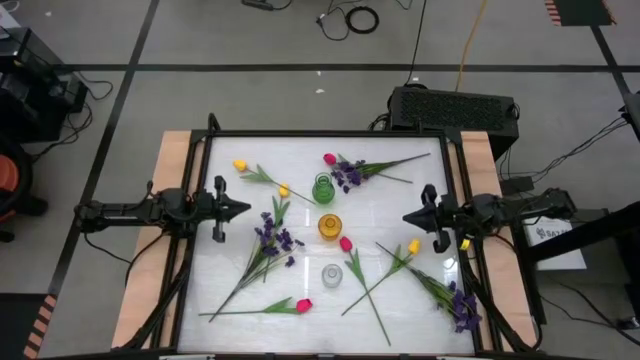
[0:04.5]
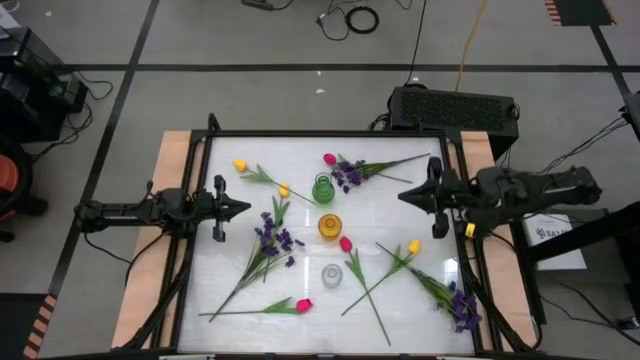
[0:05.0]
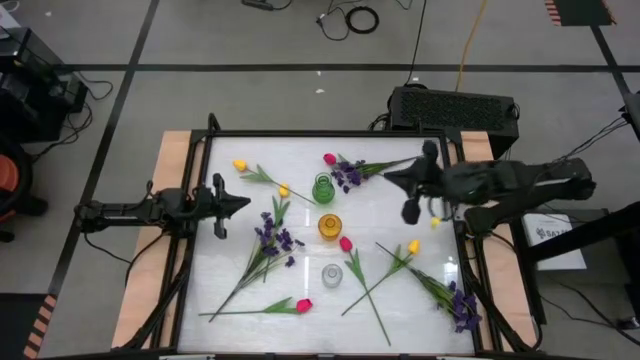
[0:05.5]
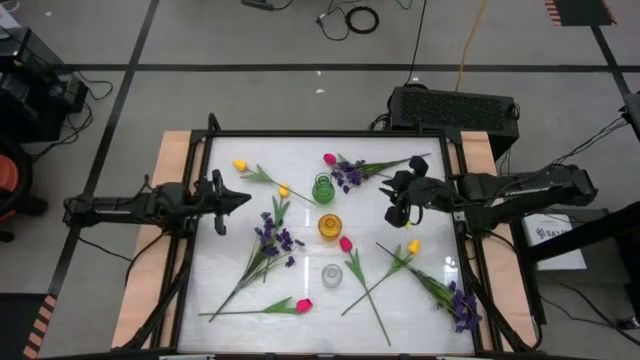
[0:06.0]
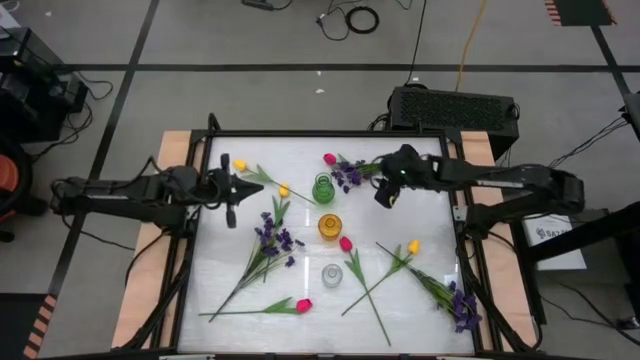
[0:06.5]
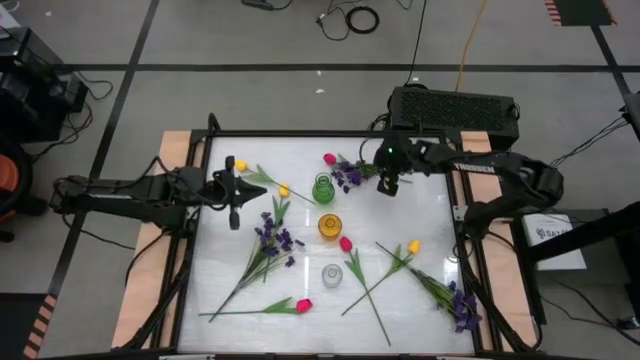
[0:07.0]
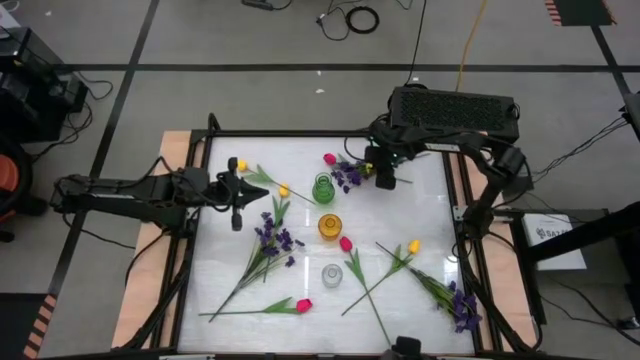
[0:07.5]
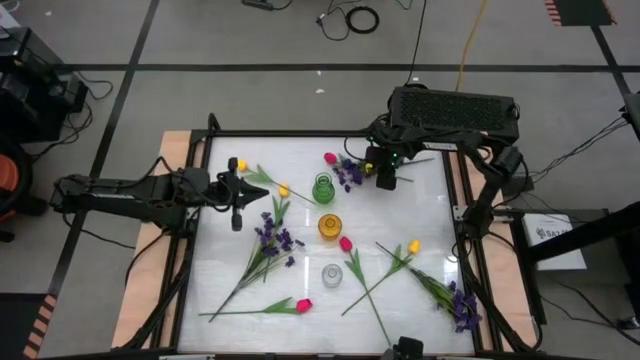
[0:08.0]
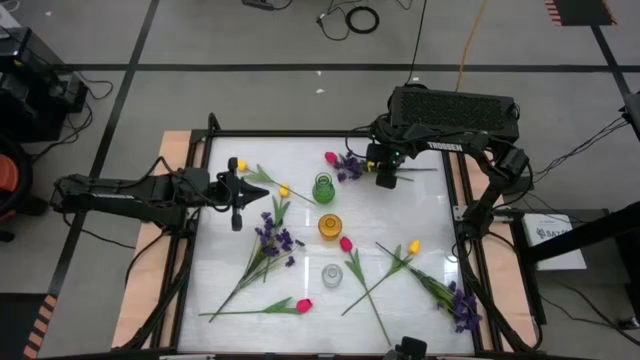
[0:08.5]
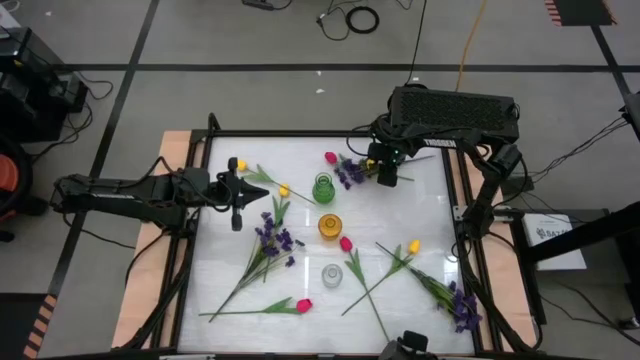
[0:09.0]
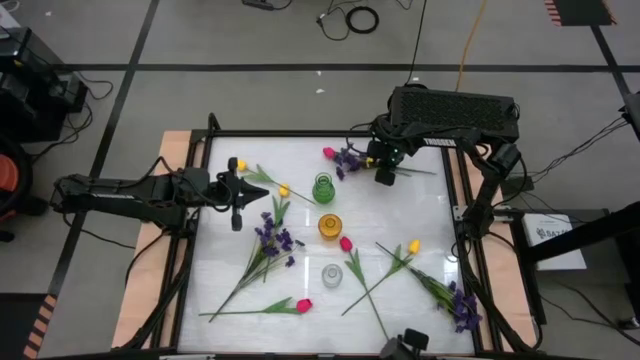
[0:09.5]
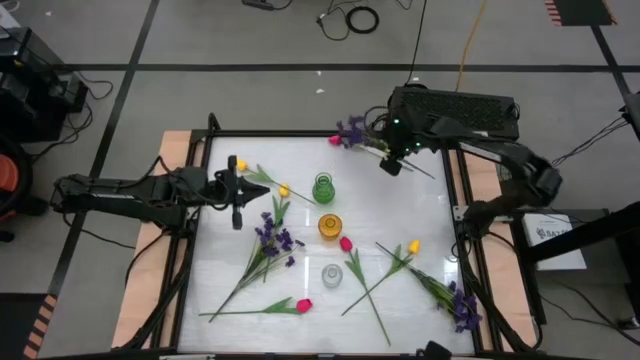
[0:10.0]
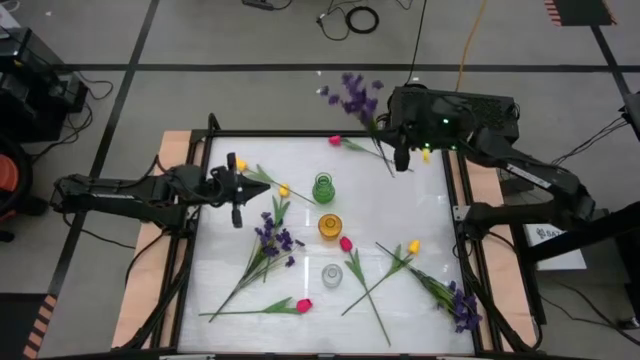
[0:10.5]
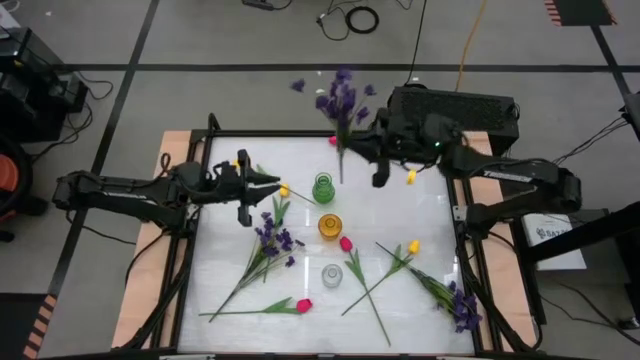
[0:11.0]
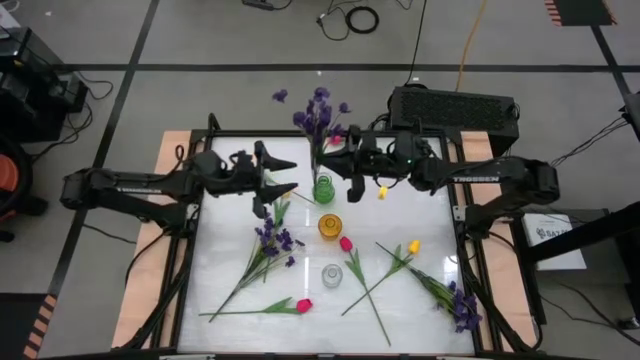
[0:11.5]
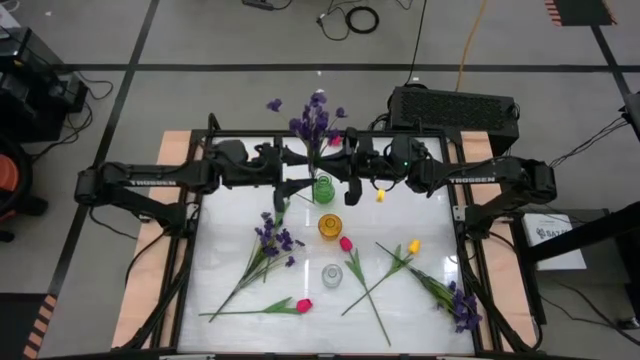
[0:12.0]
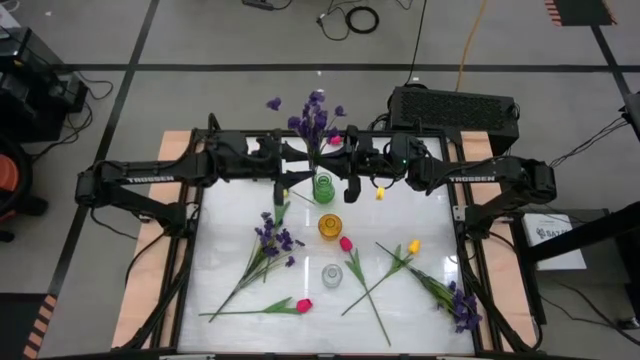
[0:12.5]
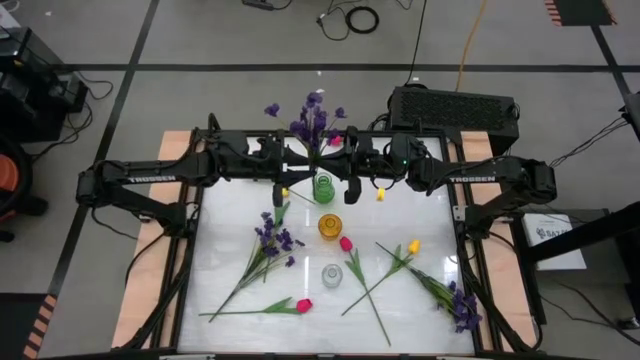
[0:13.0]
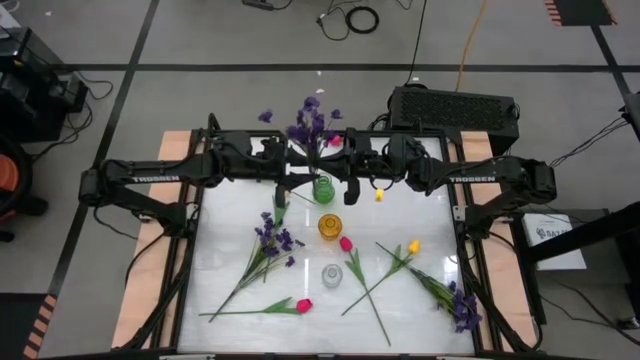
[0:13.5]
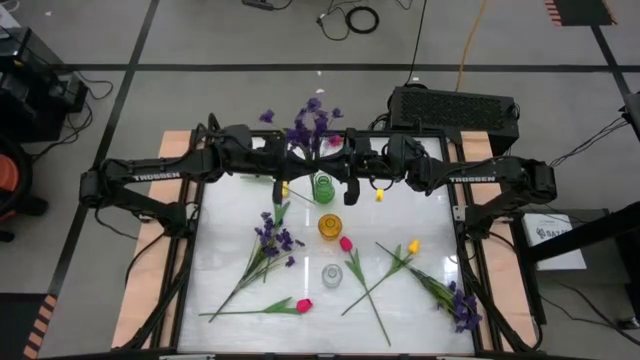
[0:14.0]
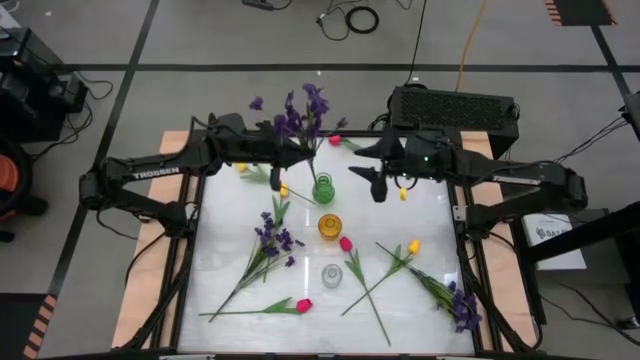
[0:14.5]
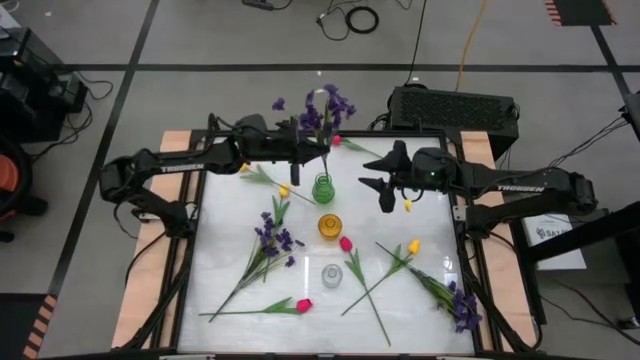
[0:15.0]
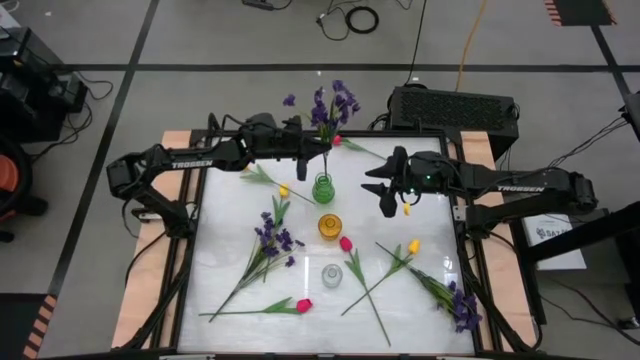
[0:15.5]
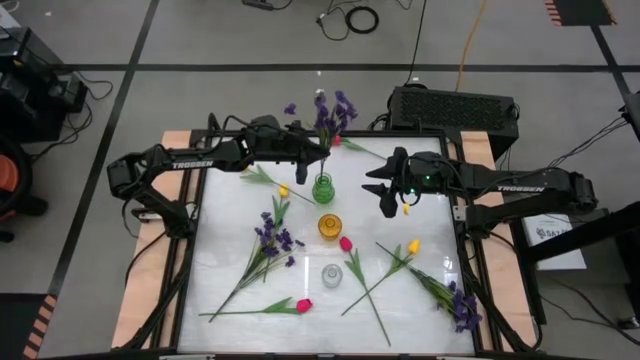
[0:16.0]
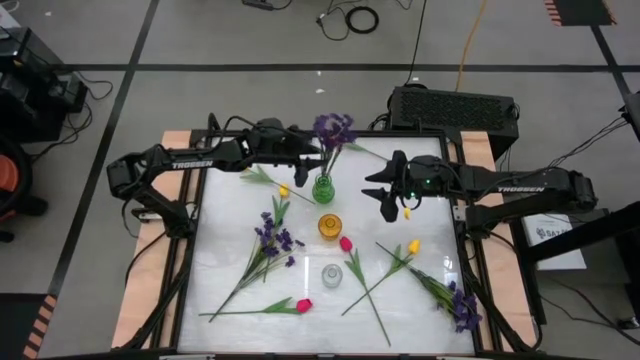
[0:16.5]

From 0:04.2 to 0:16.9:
Task: Sort flowers into vase by color
Put the top right purple flowers into the green vase

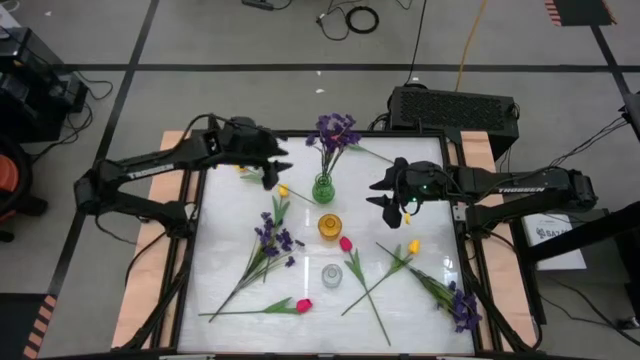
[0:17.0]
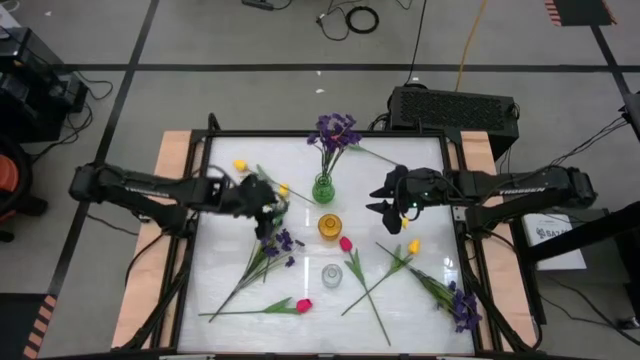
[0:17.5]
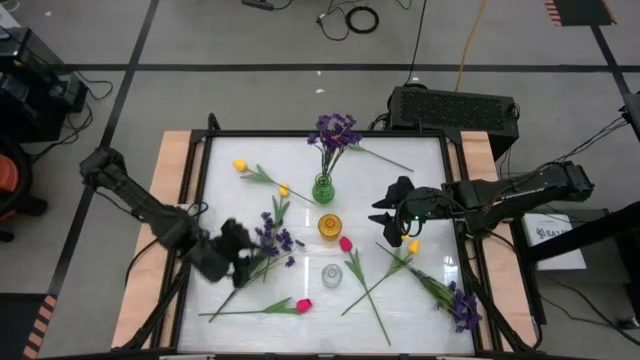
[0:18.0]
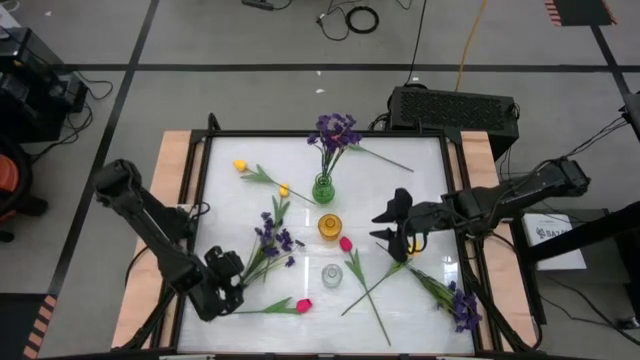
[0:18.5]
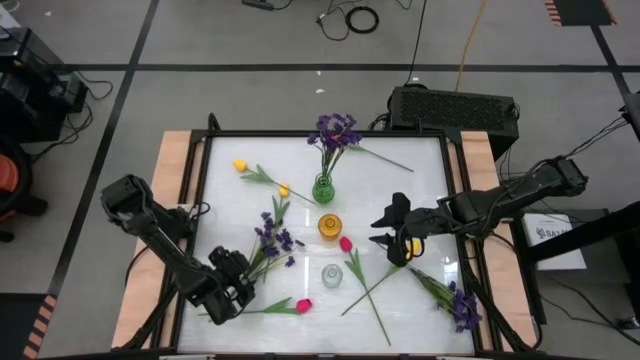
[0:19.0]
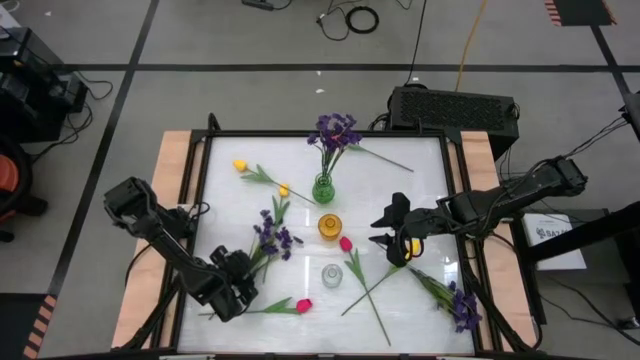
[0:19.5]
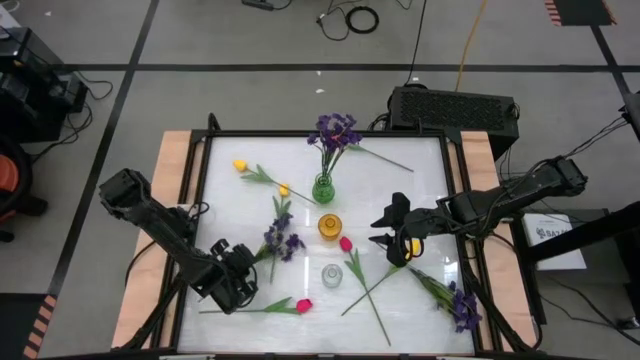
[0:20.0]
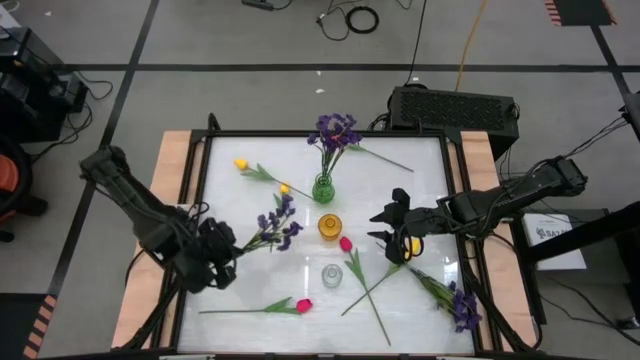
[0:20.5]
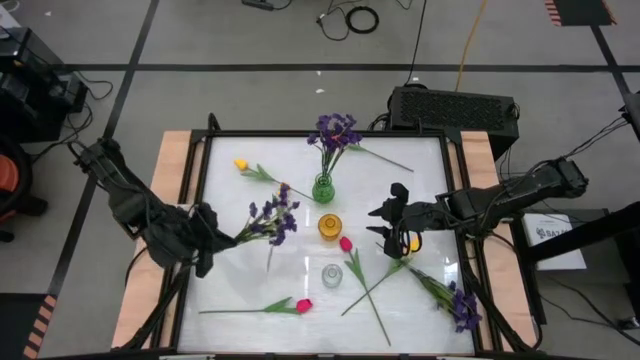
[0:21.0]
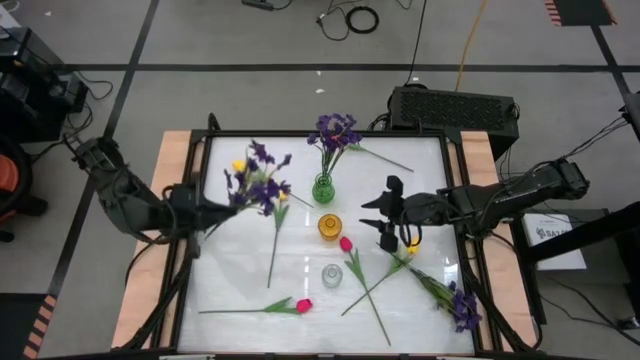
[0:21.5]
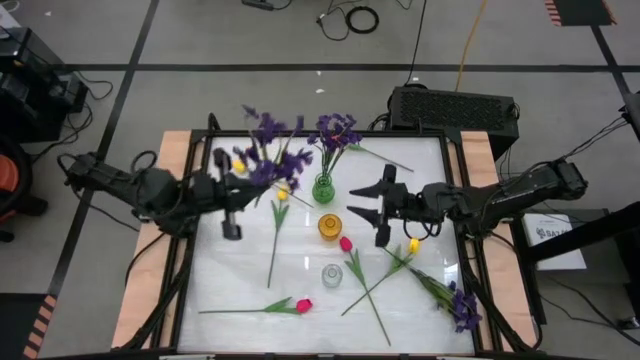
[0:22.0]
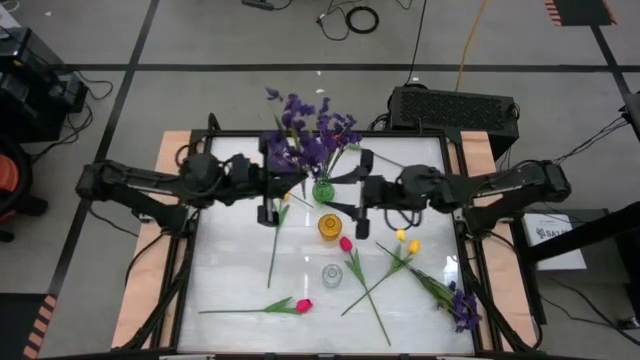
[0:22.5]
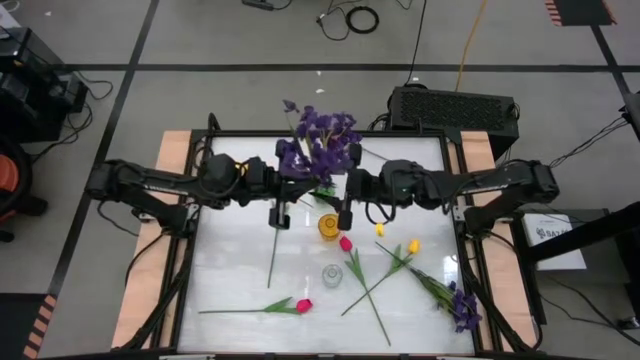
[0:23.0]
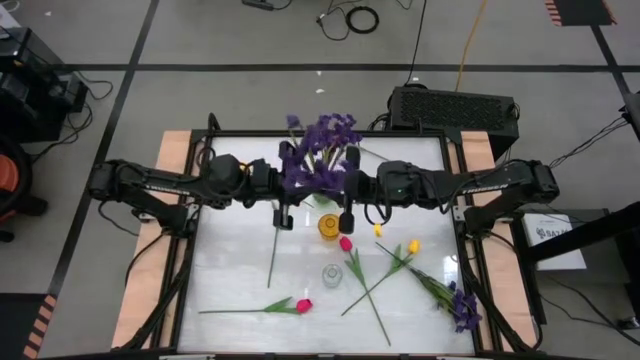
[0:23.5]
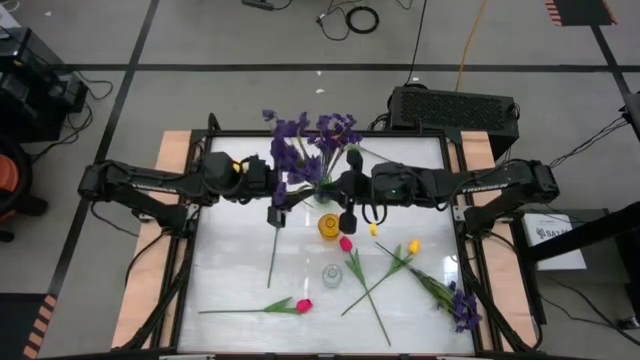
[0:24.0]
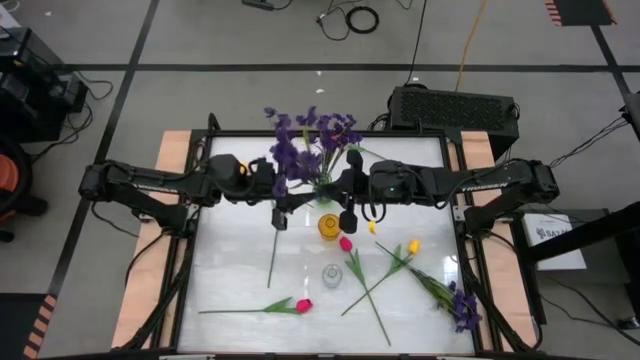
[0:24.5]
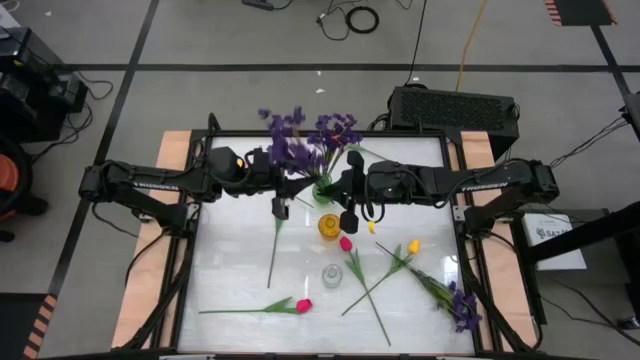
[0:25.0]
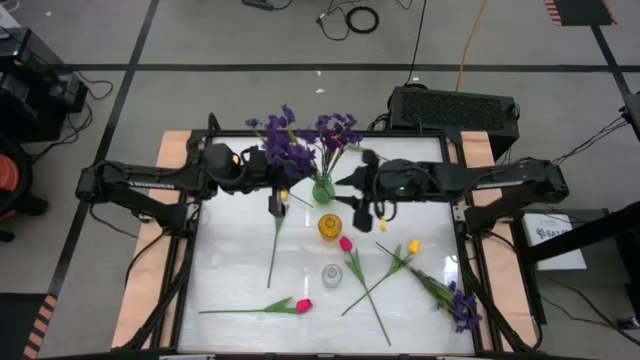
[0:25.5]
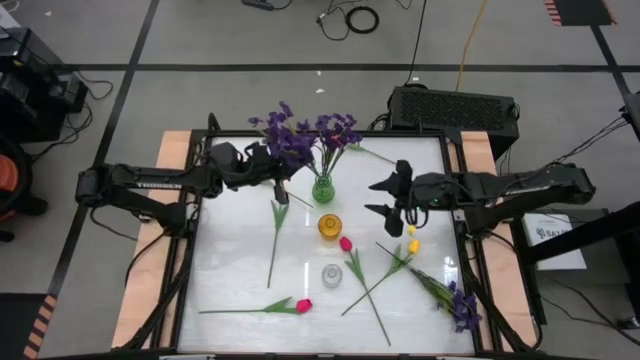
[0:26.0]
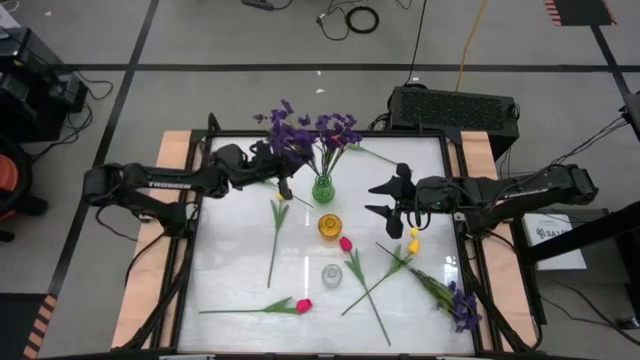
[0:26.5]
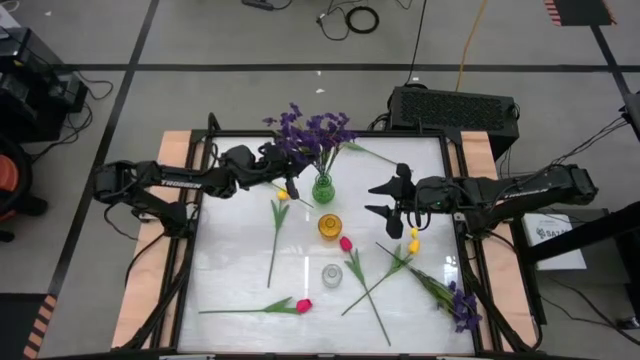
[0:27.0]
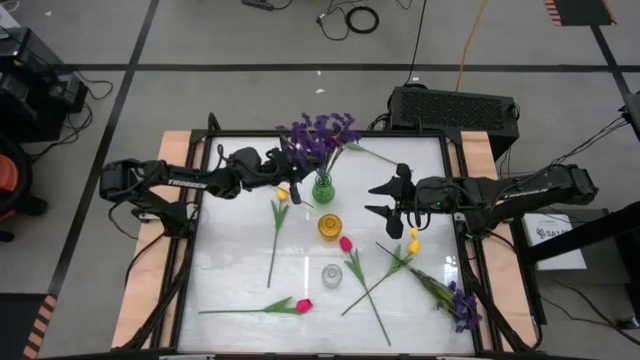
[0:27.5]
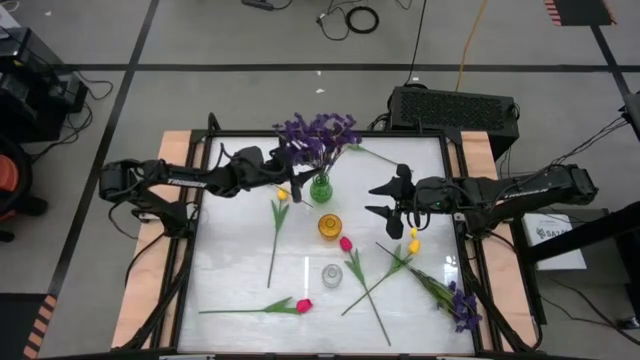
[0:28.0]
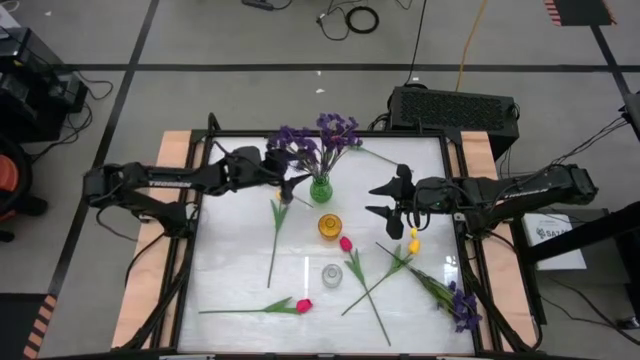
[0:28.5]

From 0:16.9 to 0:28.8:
Put the top purple flowers into the green vase
